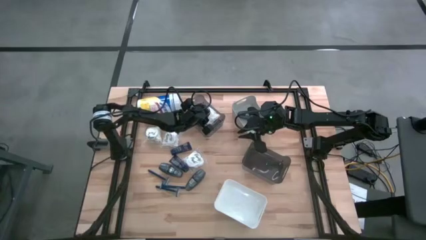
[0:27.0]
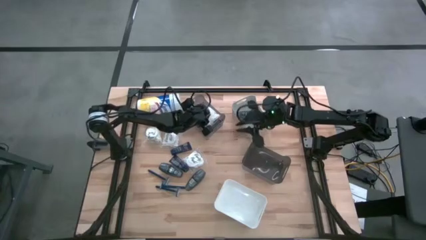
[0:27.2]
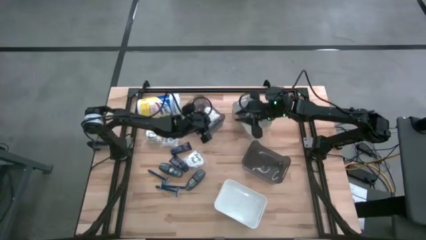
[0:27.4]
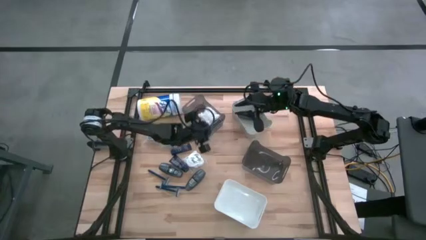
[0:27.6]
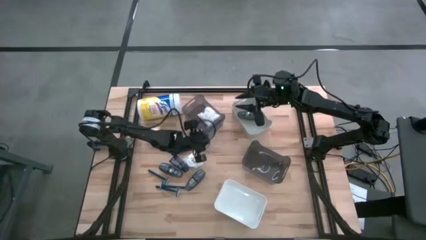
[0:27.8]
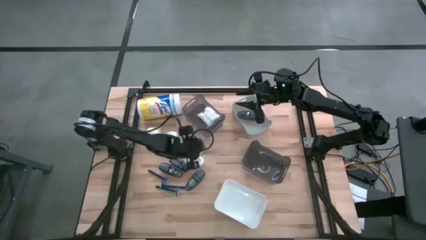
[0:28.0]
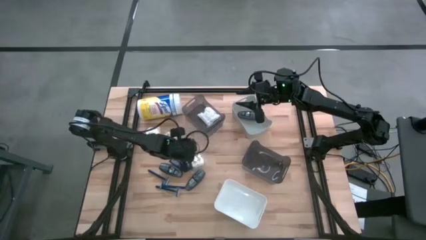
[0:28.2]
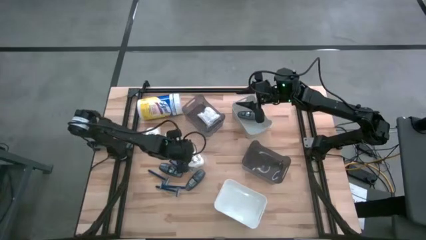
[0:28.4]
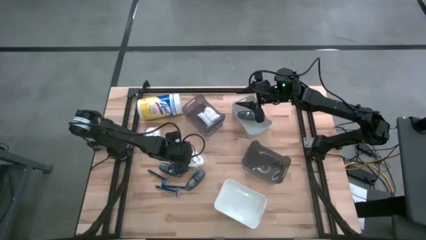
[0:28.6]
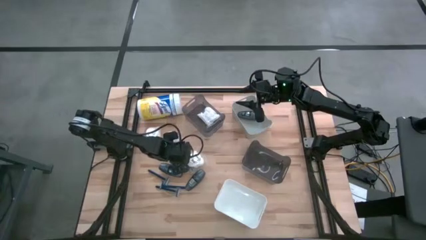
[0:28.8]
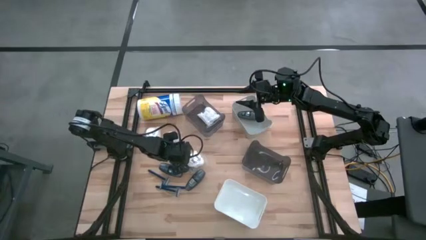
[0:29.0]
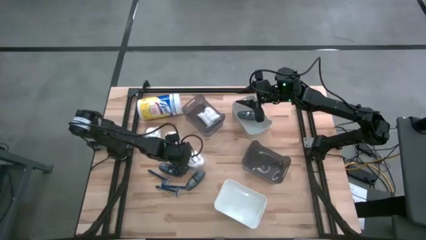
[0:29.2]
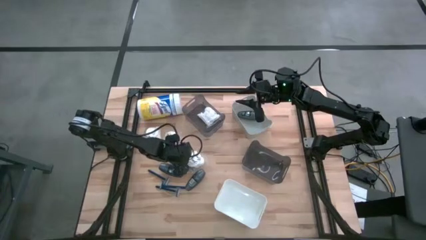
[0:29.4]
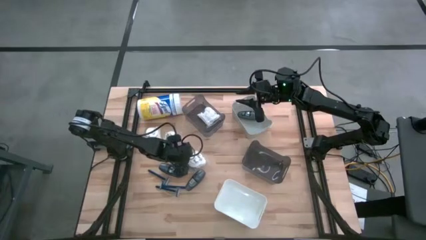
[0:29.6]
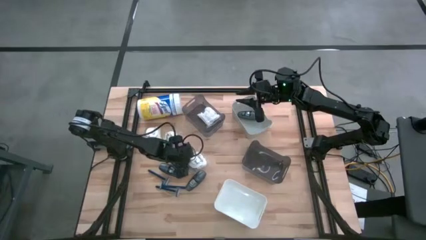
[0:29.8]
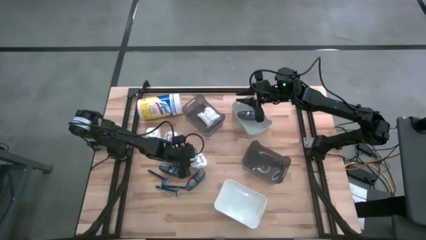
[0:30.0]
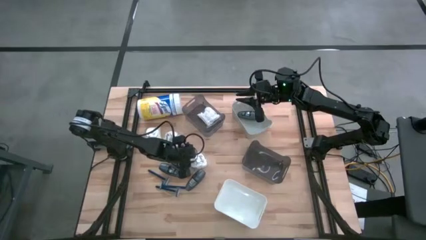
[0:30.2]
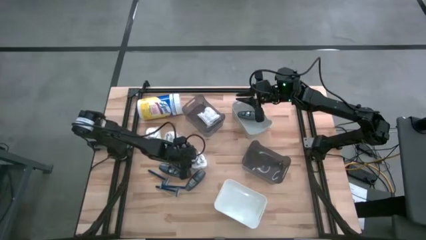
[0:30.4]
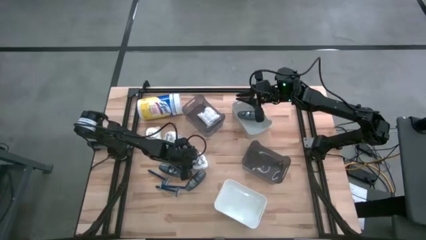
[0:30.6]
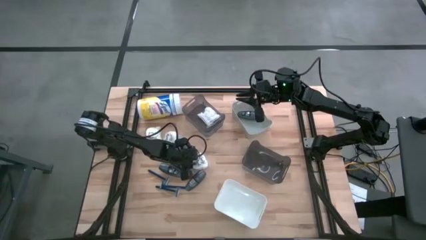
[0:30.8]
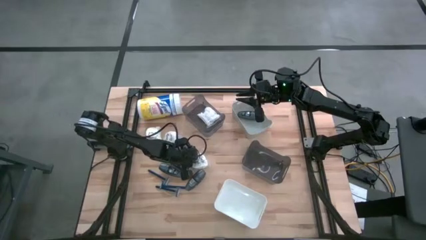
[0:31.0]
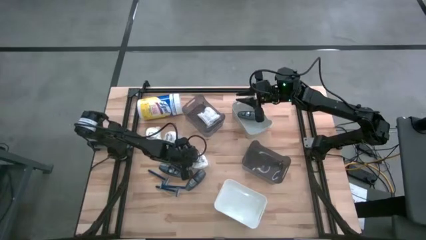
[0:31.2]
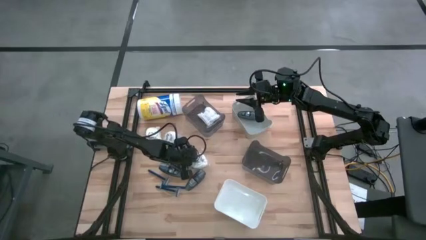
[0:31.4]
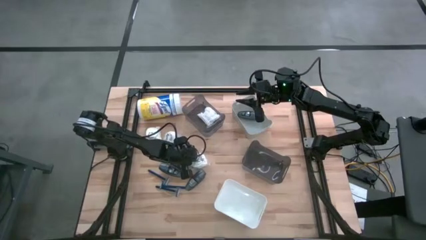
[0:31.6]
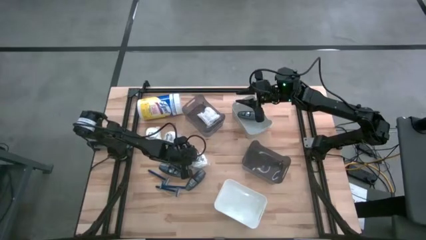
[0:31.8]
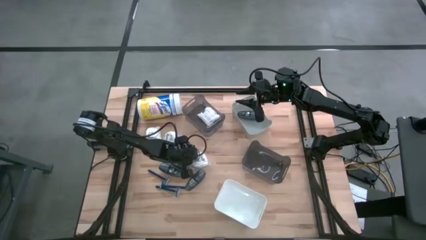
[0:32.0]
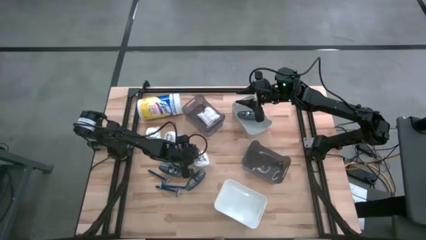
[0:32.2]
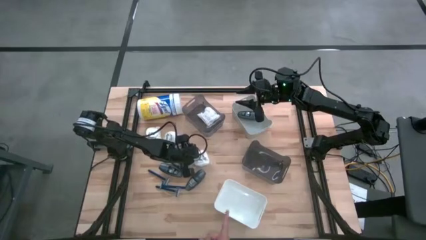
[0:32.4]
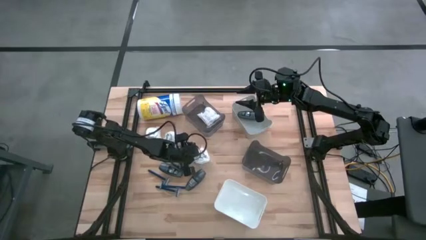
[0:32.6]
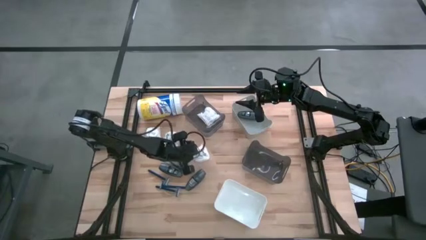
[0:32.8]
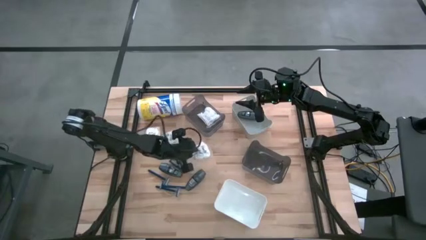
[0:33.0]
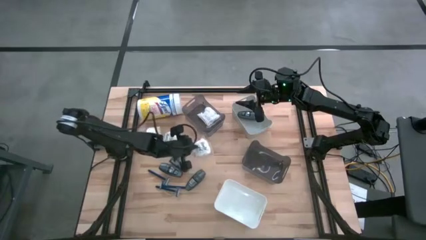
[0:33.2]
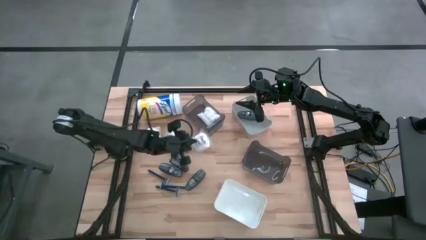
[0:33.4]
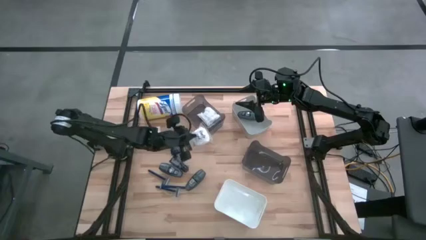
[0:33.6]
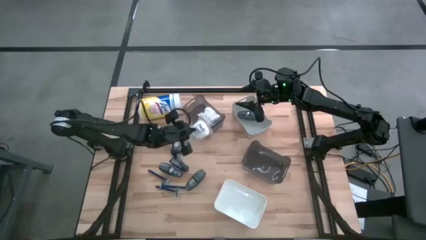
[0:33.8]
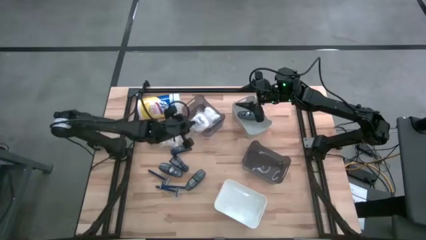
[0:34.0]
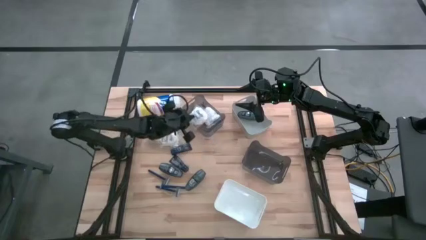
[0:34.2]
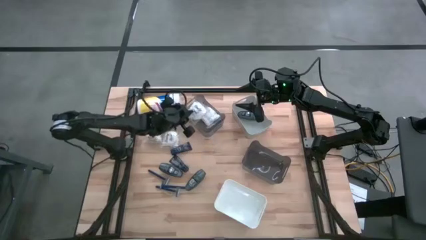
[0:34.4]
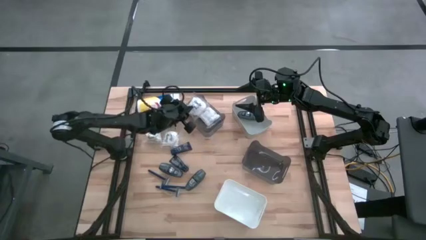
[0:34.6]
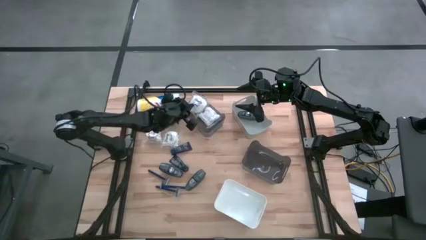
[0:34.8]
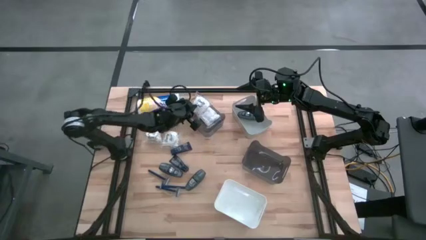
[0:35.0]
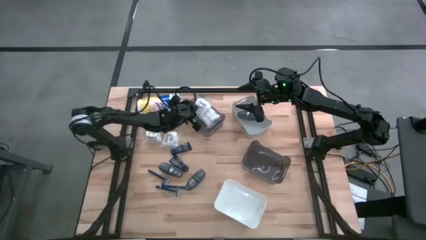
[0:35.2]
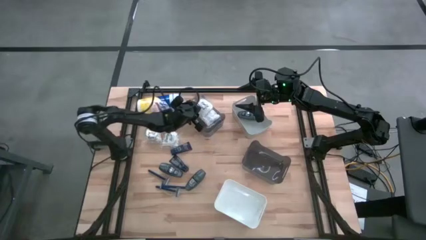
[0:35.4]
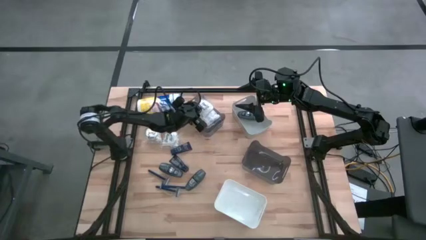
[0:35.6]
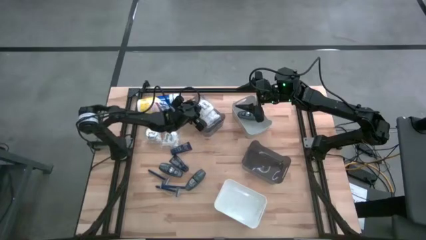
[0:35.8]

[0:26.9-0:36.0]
Task: Pick & Place Travel size toiletries
Put the white cotton pack into the top black bin

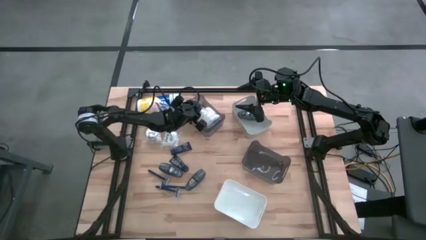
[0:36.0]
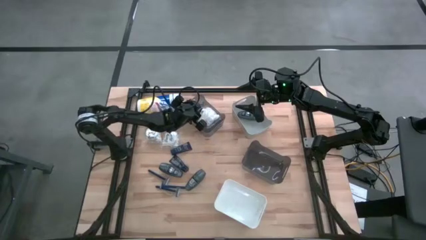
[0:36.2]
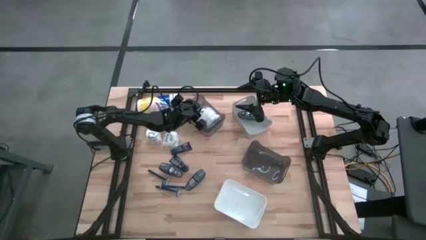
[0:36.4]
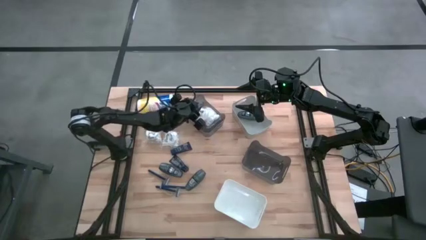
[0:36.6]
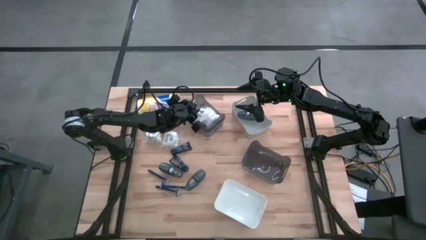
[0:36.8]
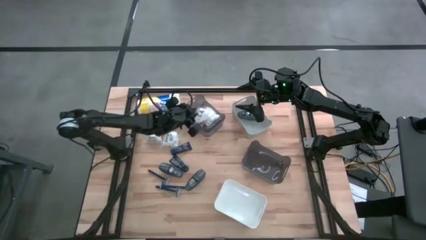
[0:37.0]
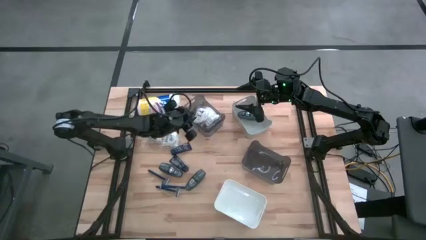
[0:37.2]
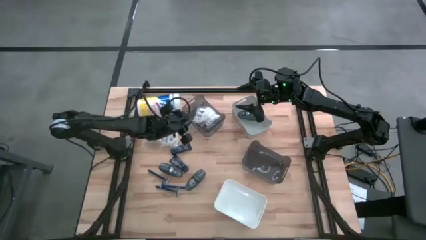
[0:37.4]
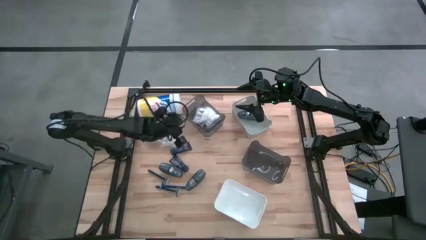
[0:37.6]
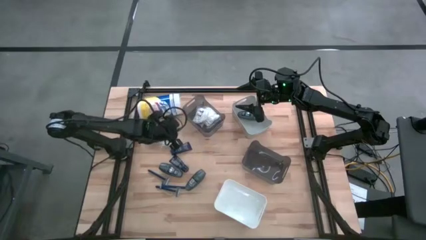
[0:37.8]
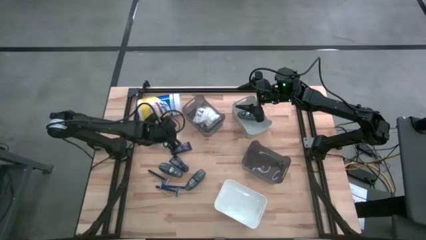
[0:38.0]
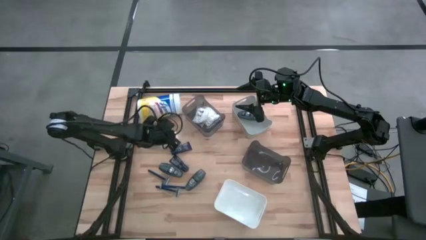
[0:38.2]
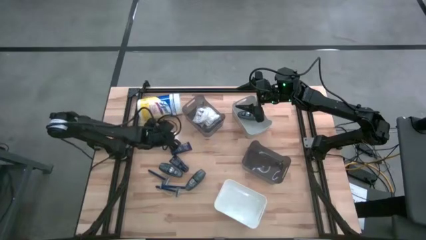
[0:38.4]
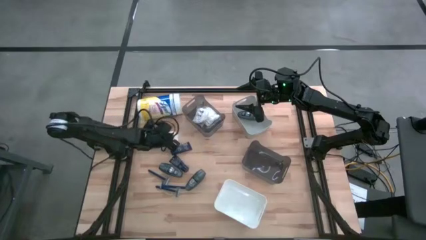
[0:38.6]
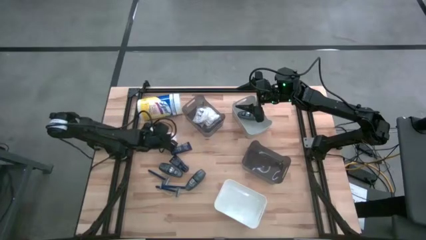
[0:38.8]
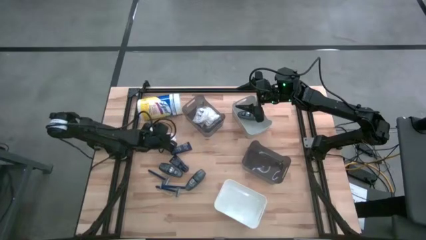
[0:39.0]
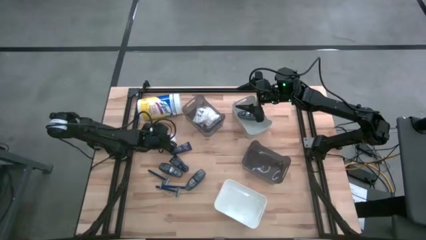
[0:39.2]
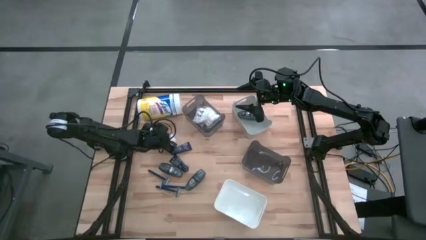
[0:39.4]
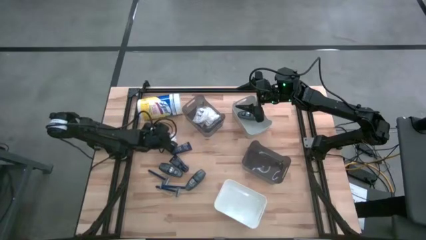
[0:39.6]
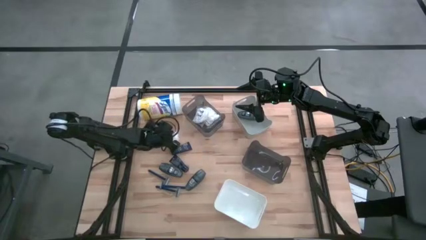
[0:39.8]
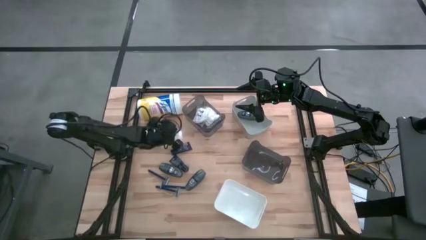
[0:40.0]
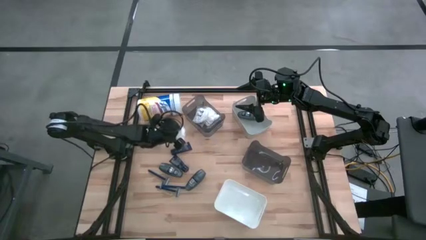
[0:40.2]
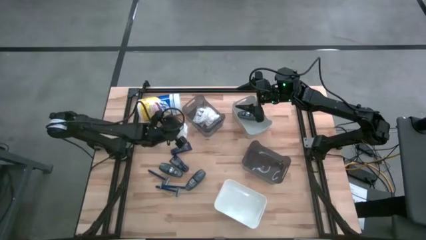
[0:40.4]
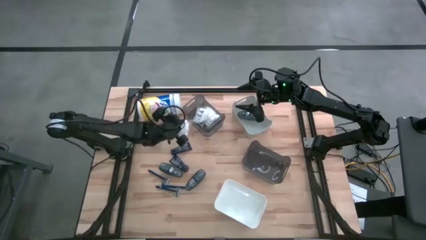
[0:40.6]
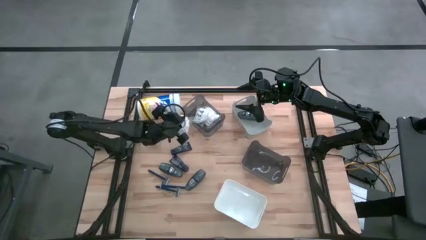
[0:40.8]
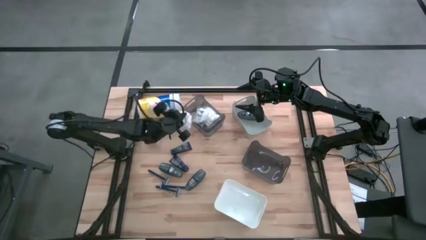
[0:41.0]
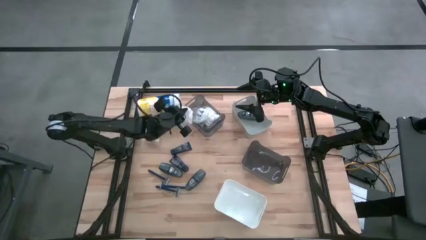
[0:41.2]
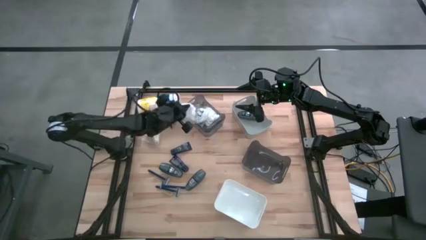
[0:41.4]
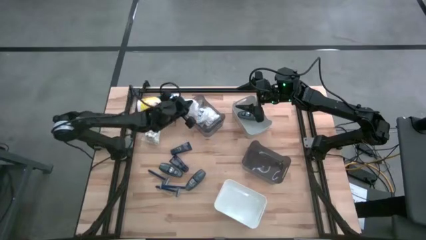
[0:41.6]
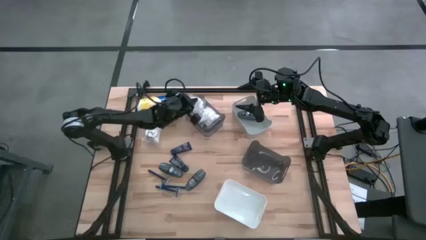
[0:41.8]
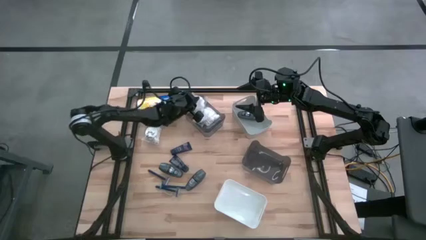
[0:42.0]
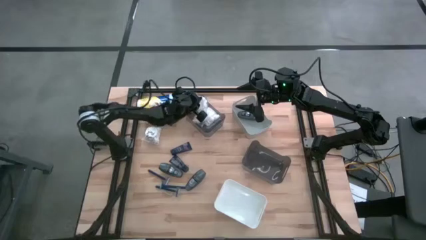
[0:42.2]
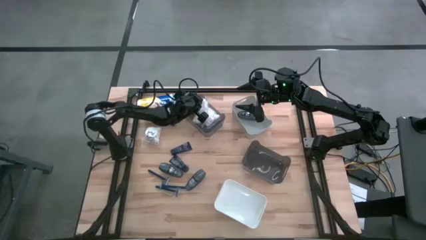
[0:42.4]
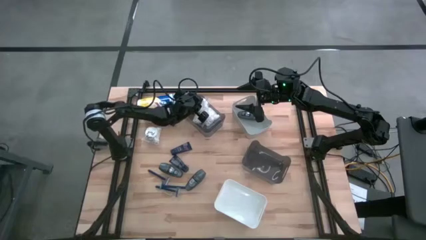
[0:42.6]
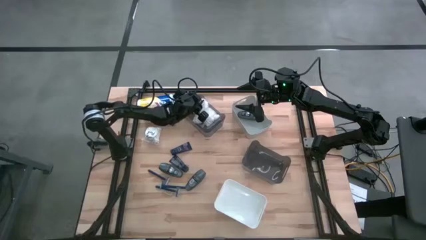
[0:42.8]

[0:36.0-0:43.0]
Put the white cotton pack into the top black bin

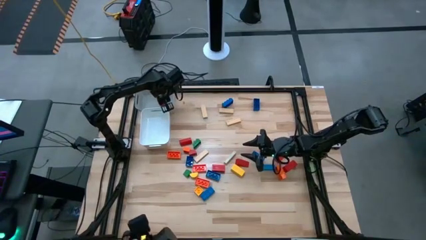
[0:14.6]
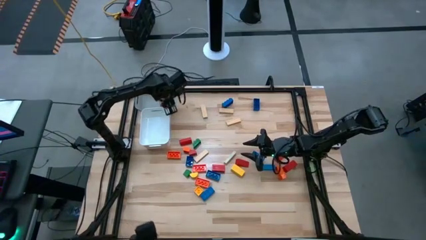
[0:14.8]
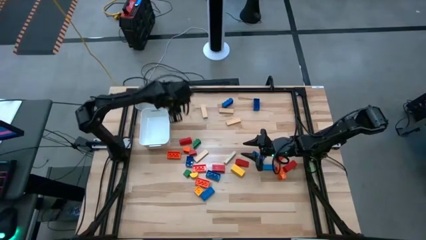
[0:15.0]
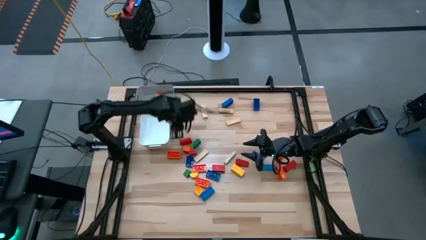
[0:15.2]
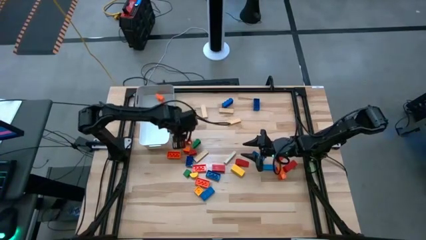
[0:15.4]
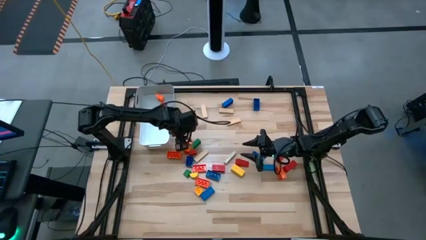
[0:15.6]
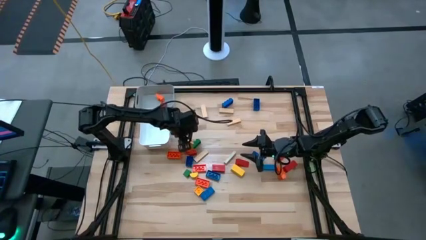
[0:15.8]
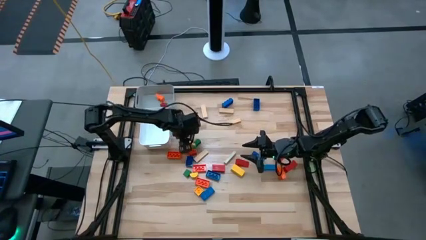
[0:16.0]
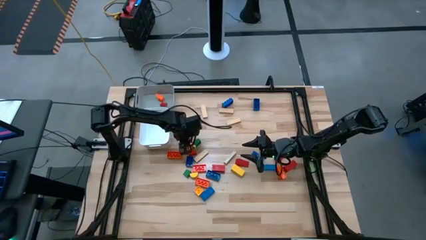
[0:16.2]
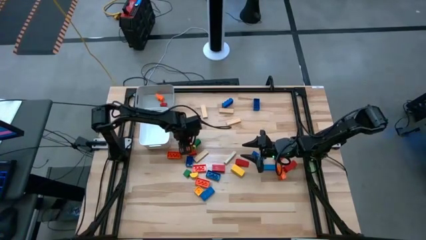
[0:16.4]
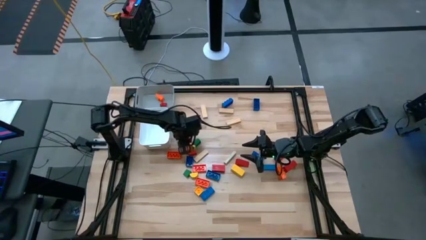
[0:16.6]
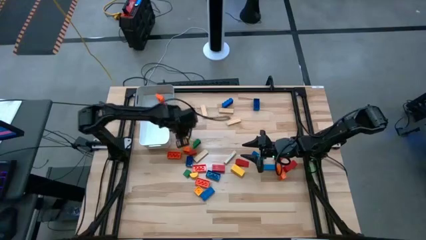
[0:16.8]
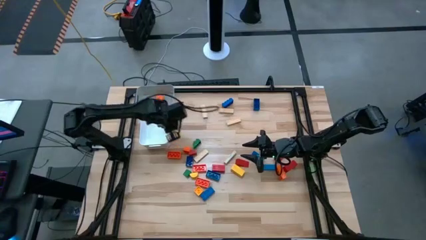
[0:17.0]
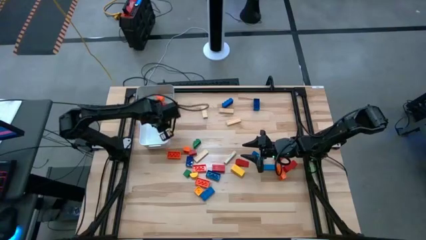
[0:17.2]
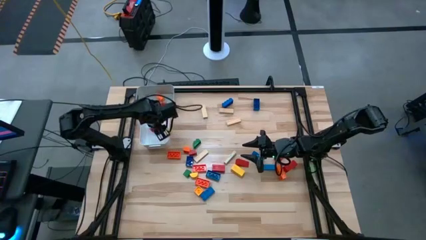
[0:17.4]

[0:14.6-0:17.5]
Task: Sort blocks by size
Put the large red wooden block into the white bin
